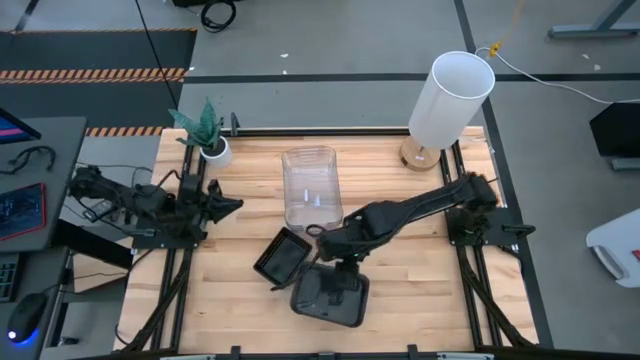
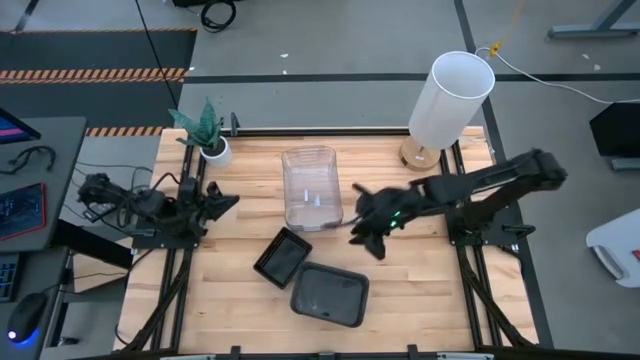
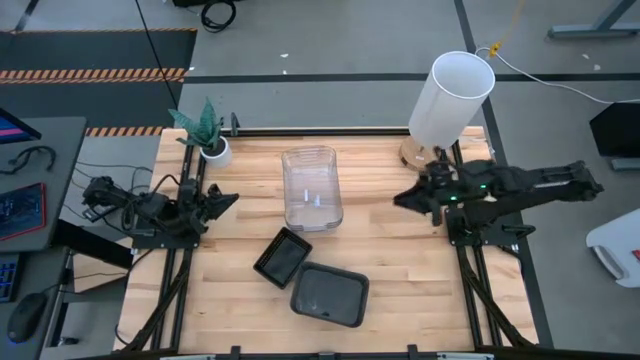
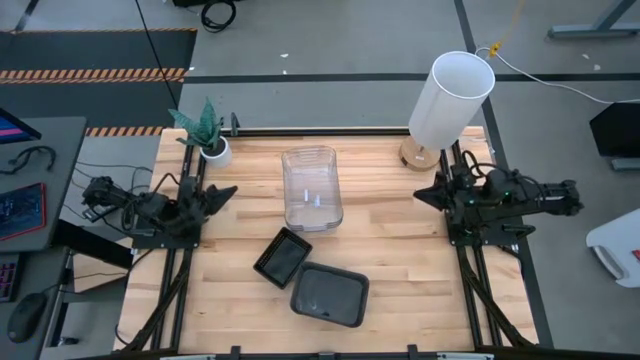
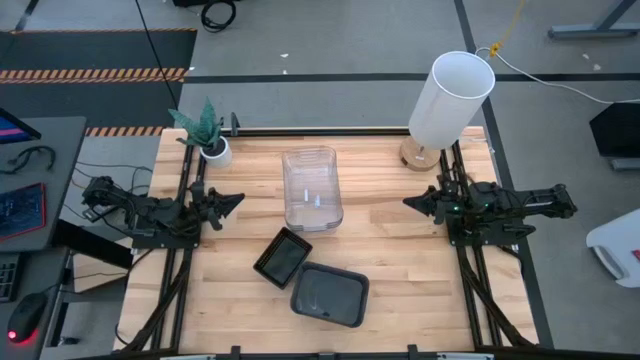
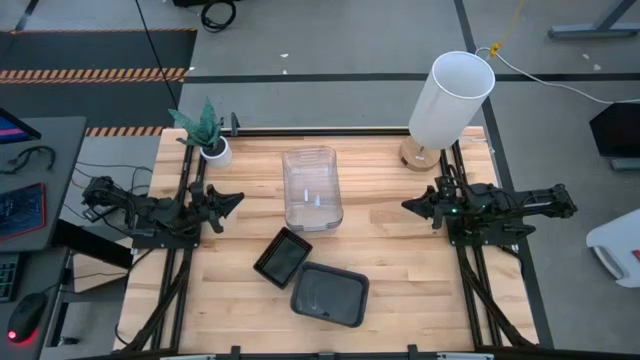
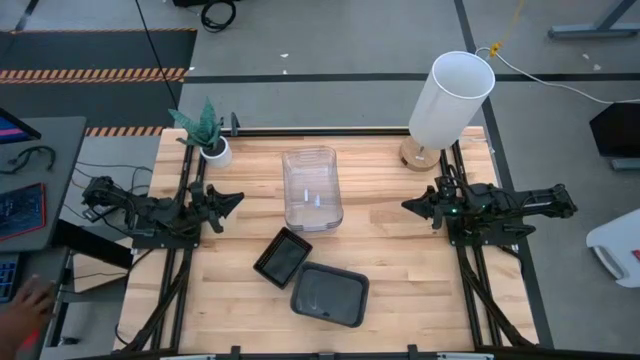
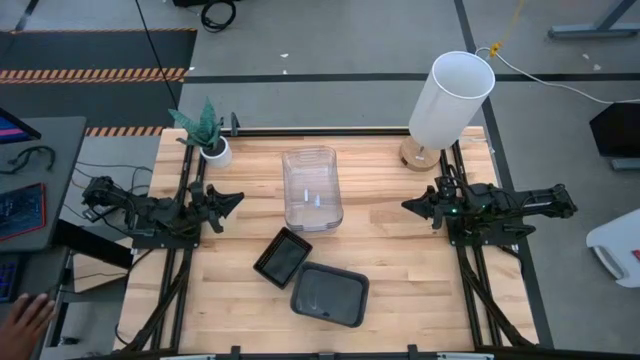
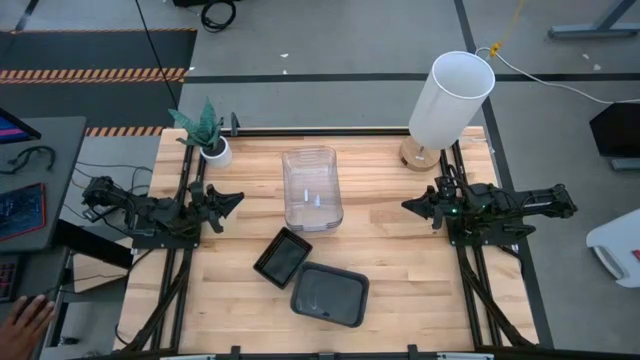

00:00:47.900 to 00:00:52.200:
Return to home position

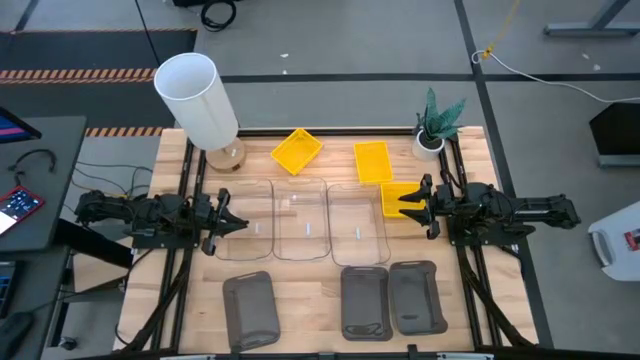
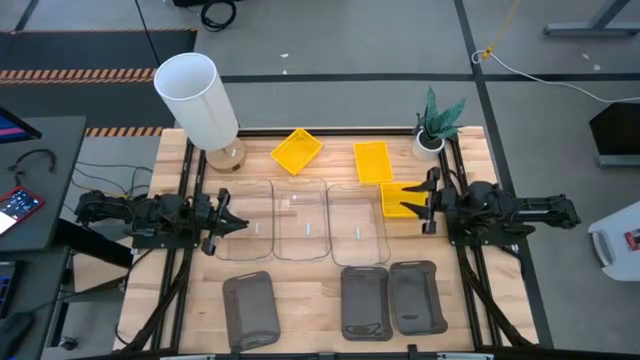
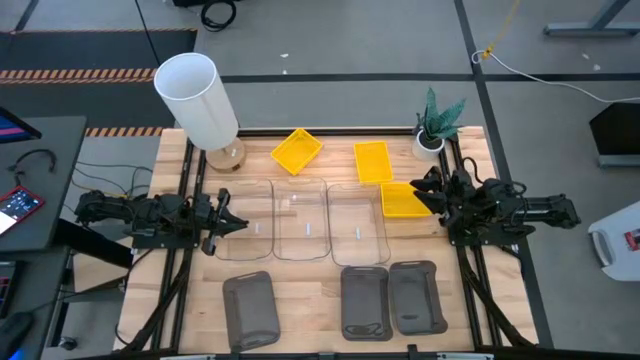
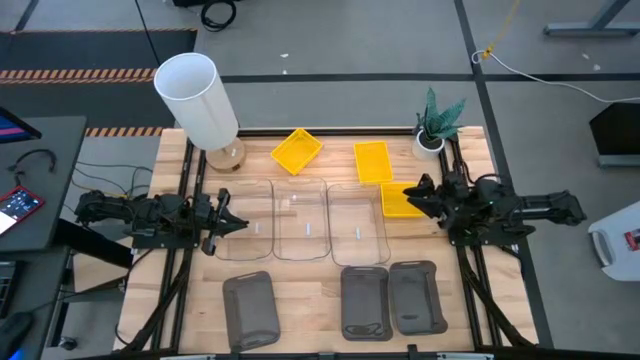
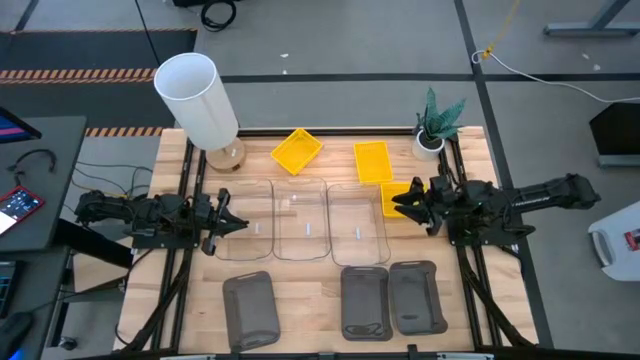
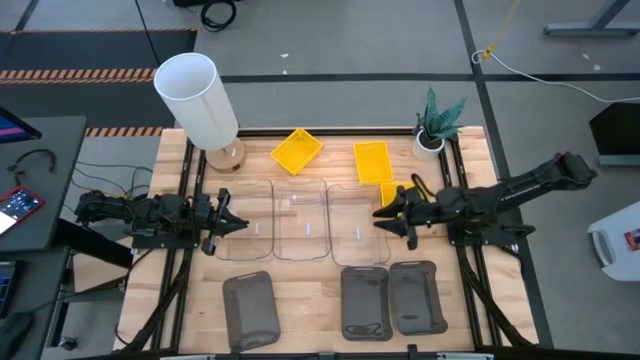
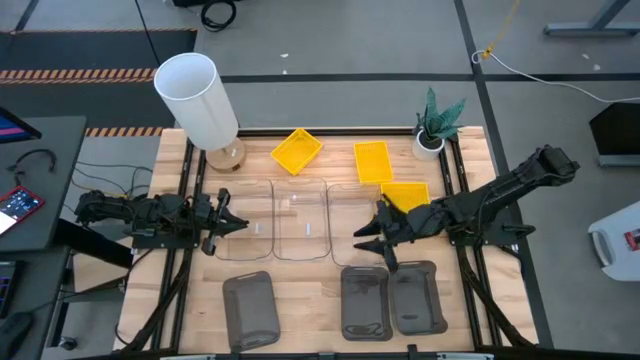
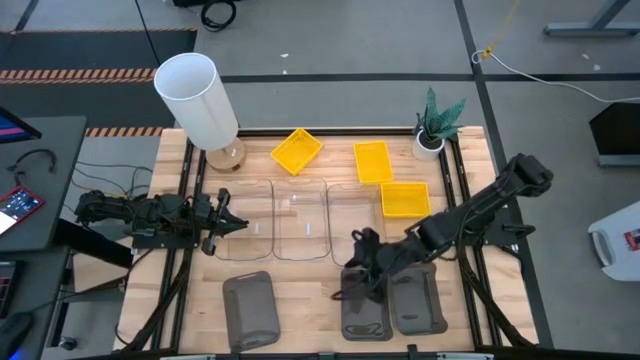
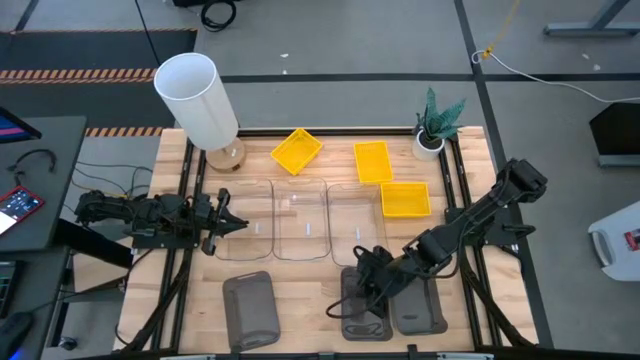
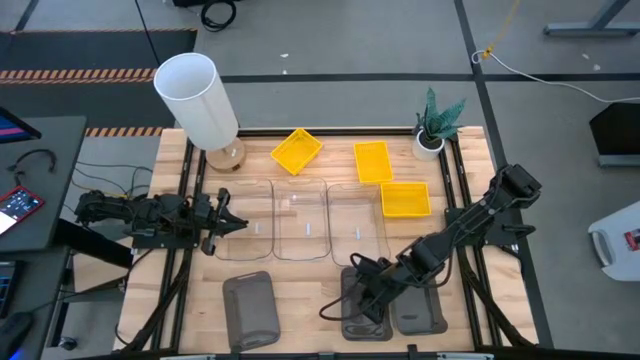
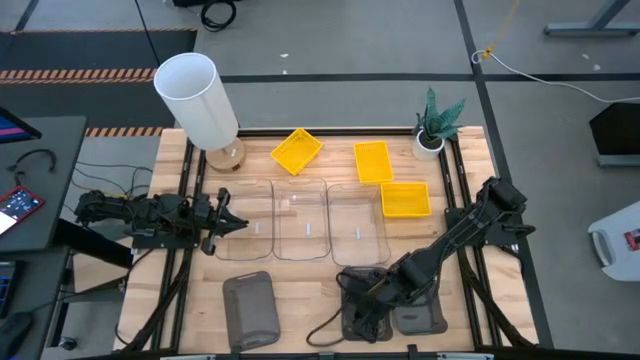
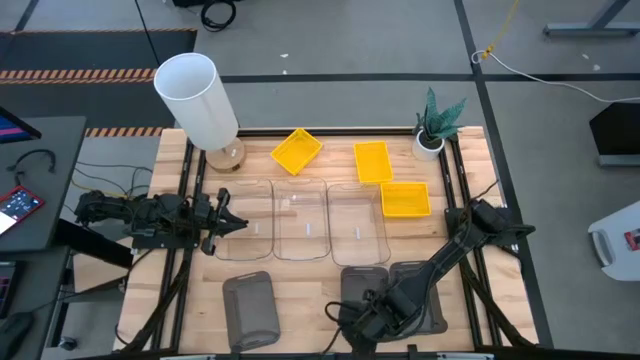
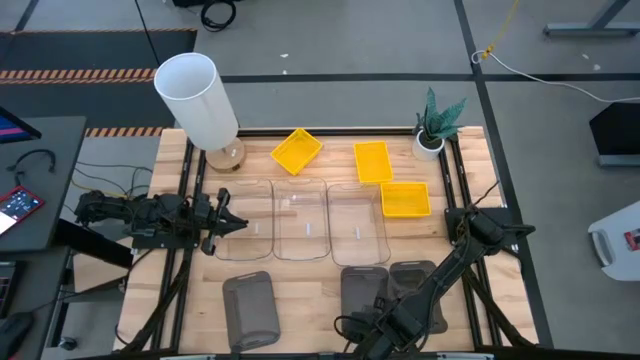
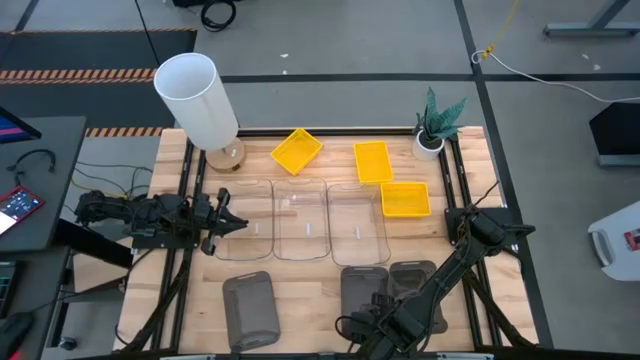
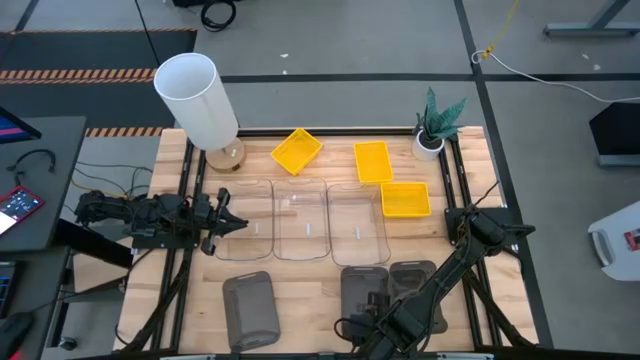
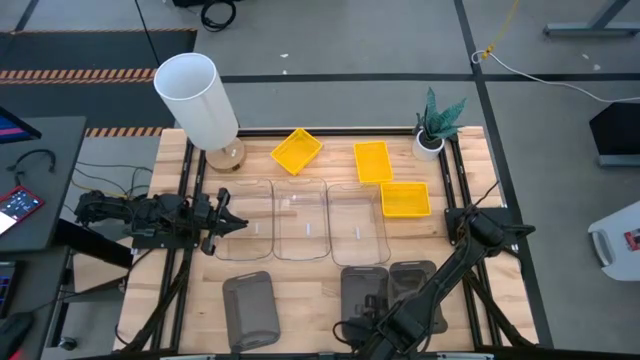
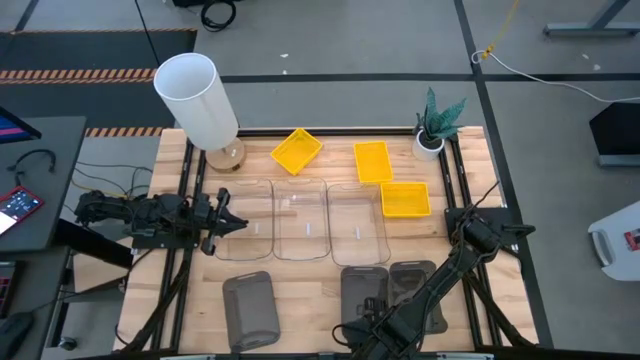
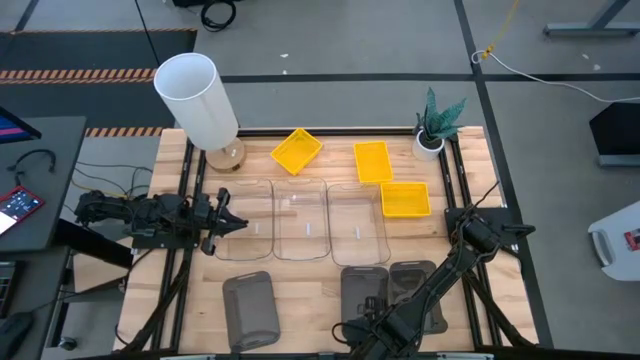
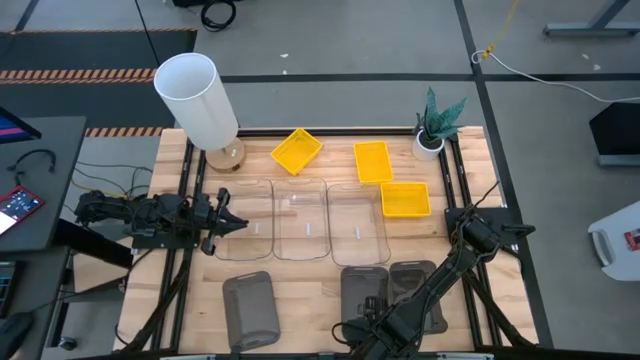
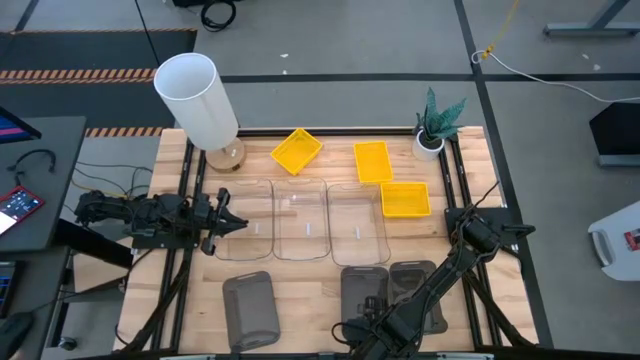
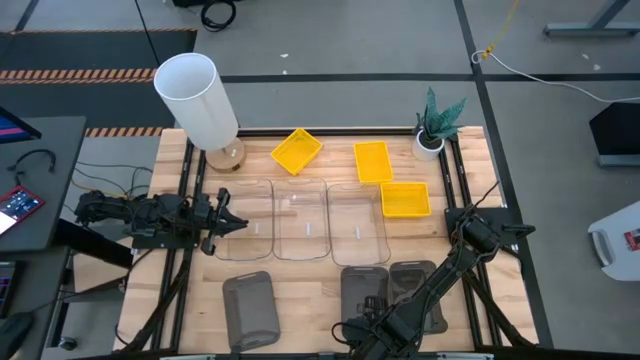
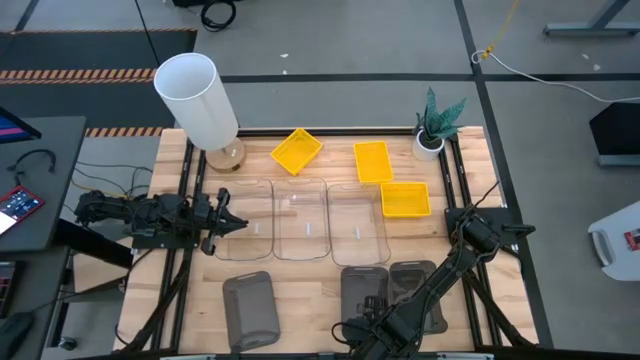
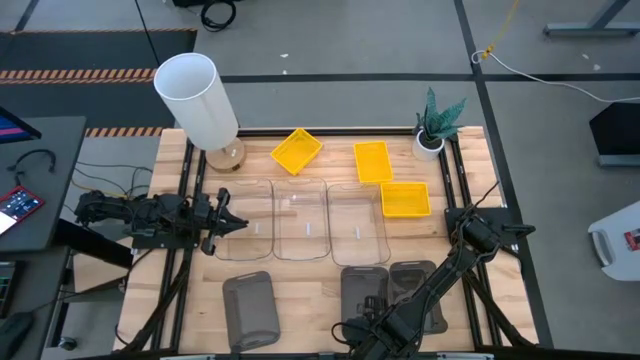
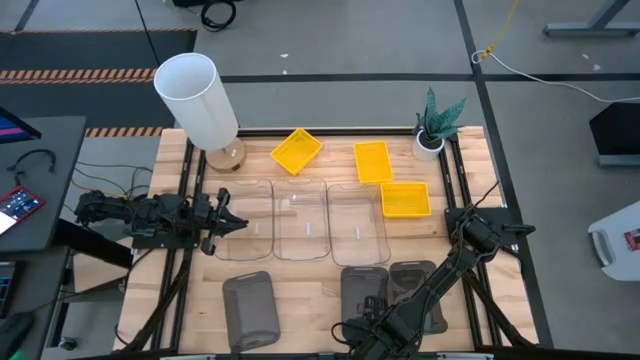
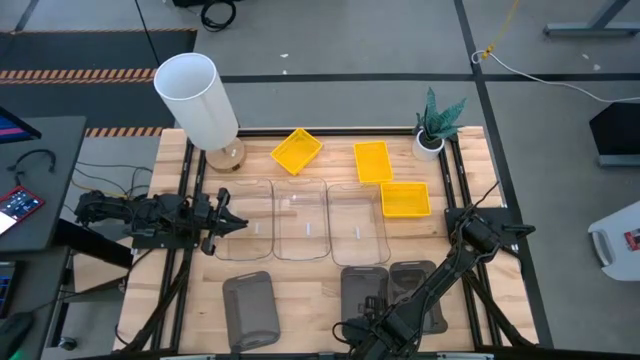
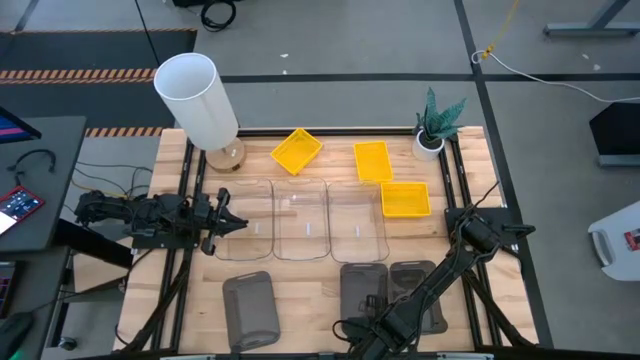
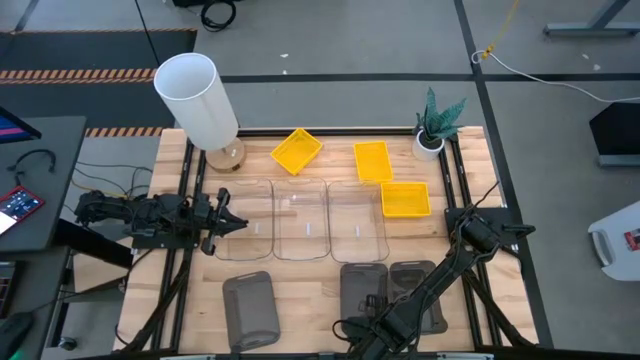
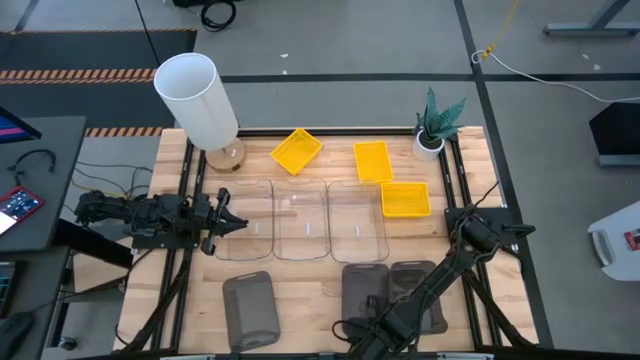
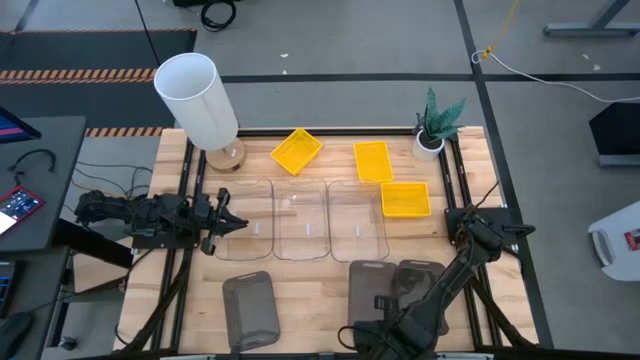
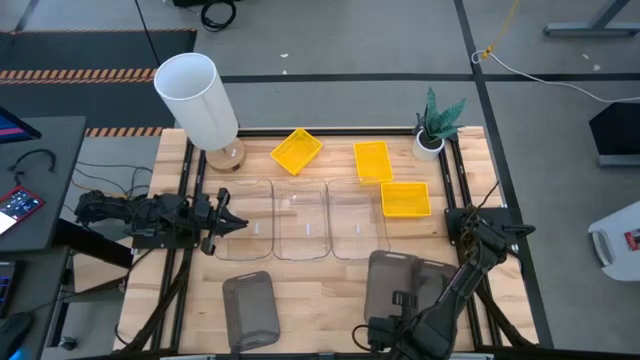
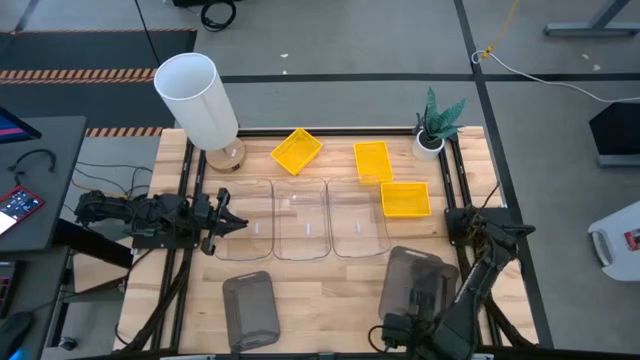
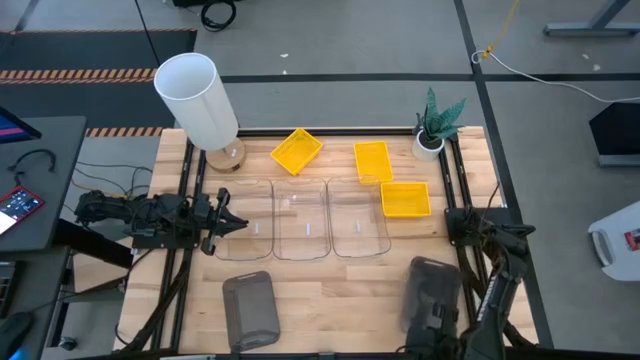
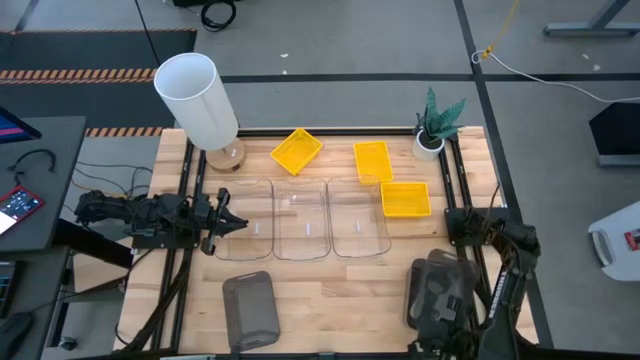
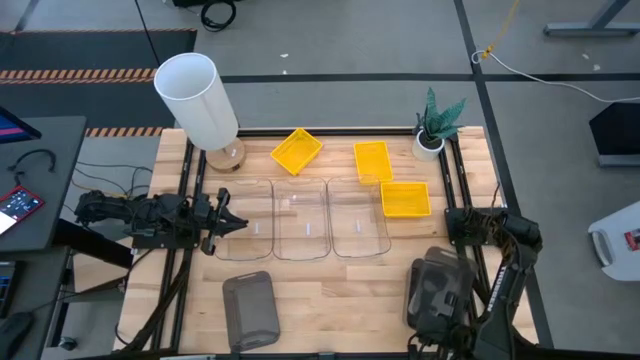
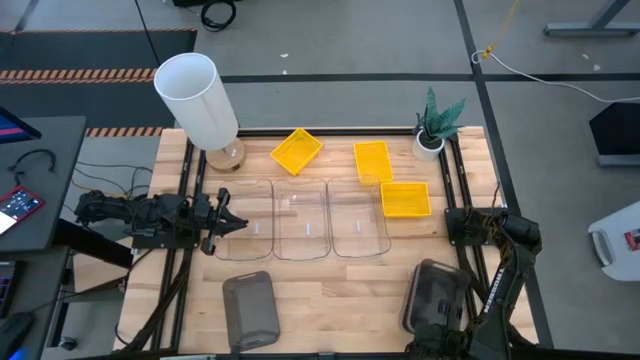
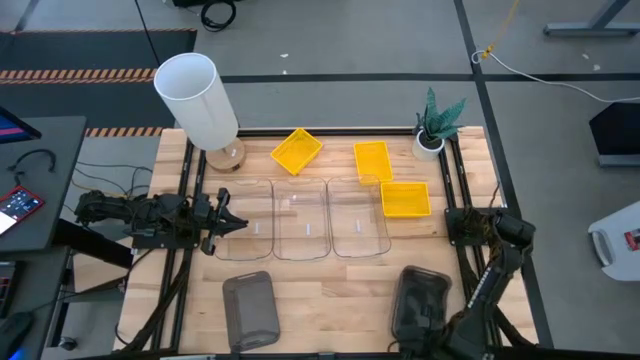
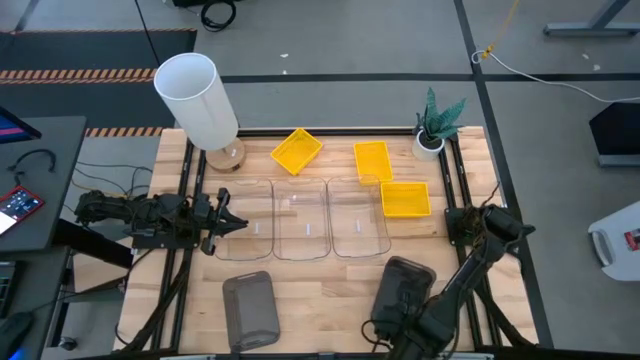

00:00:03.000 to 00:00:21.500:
Stack the middle black bin into the right black bin
